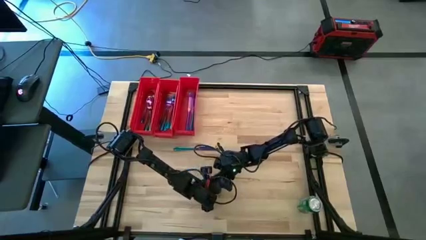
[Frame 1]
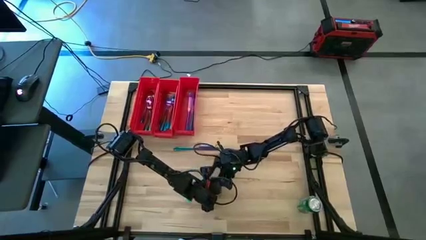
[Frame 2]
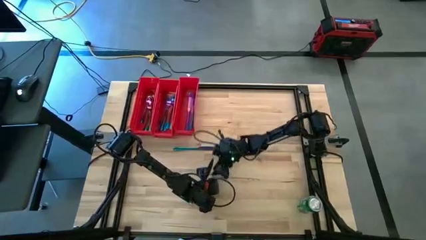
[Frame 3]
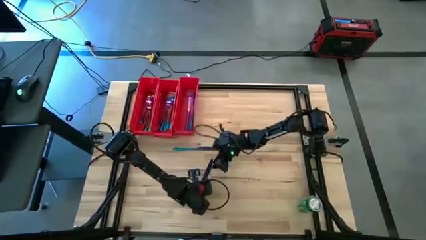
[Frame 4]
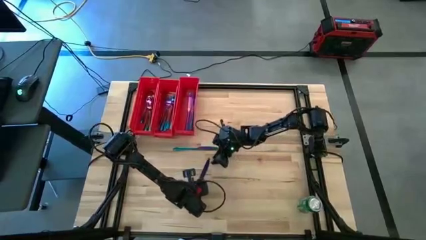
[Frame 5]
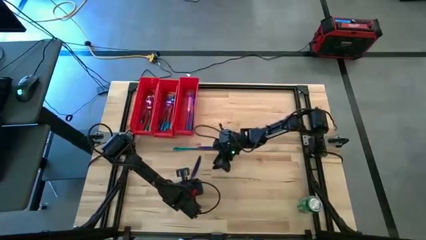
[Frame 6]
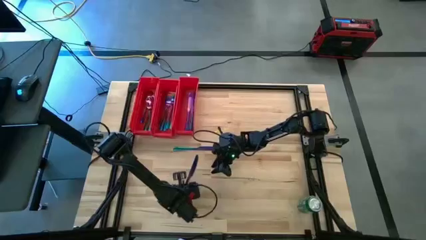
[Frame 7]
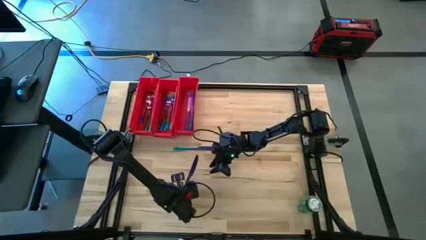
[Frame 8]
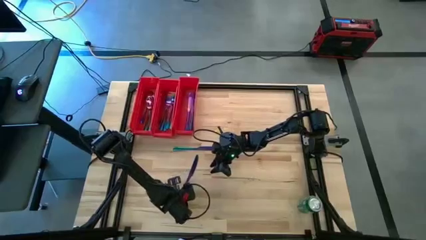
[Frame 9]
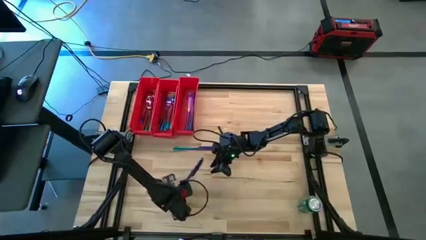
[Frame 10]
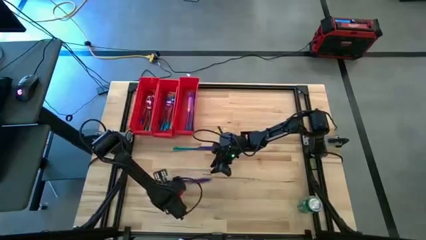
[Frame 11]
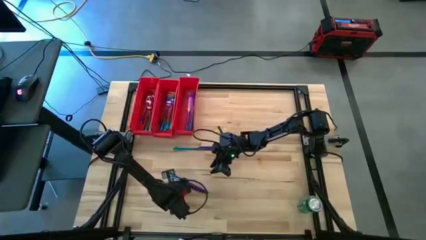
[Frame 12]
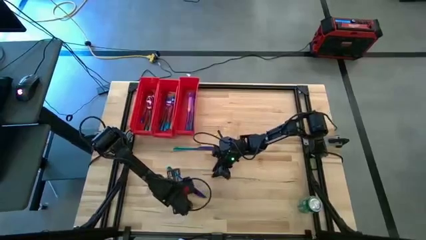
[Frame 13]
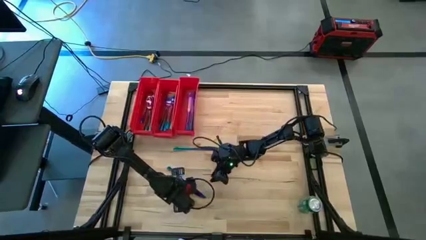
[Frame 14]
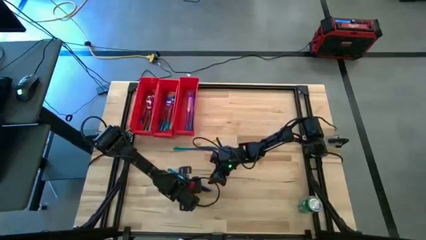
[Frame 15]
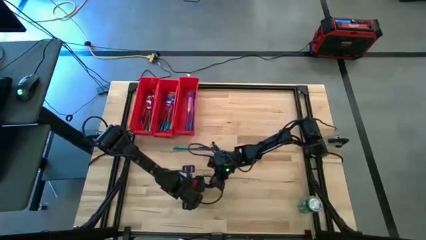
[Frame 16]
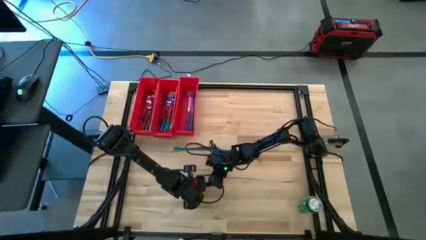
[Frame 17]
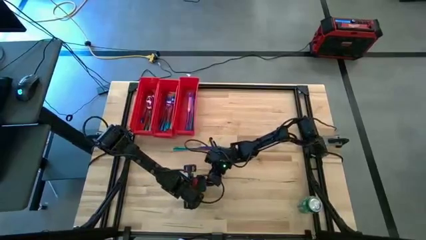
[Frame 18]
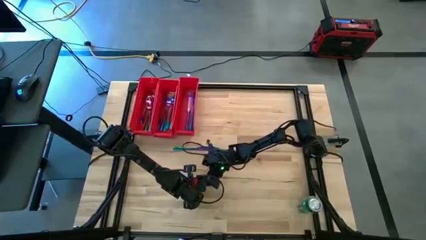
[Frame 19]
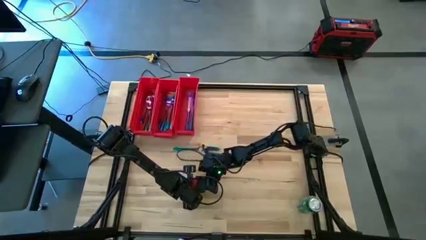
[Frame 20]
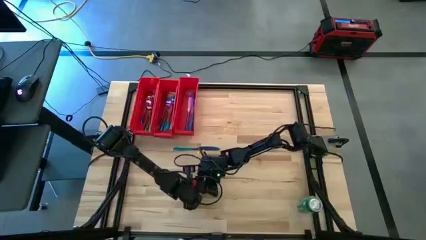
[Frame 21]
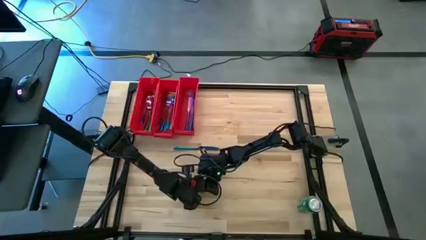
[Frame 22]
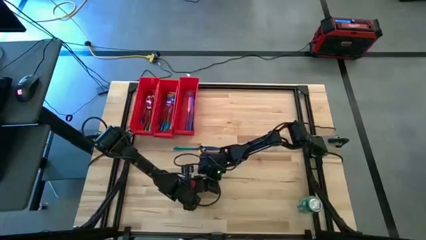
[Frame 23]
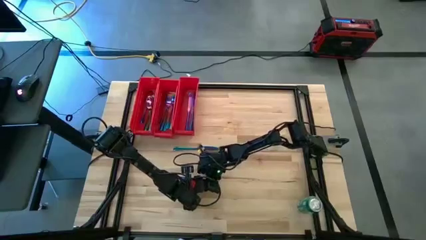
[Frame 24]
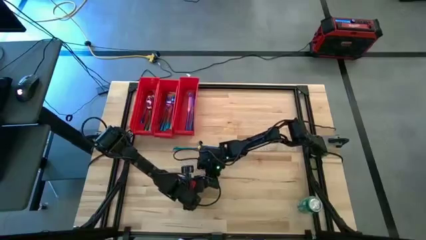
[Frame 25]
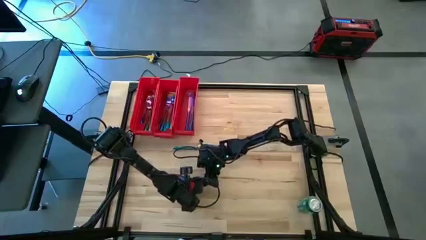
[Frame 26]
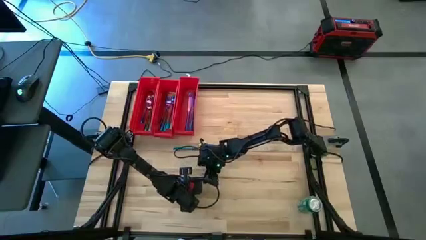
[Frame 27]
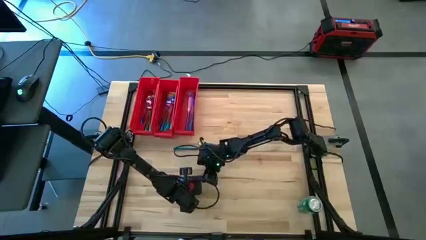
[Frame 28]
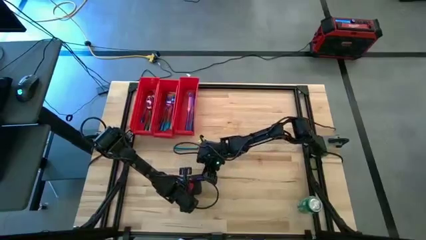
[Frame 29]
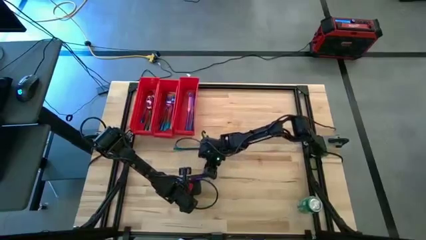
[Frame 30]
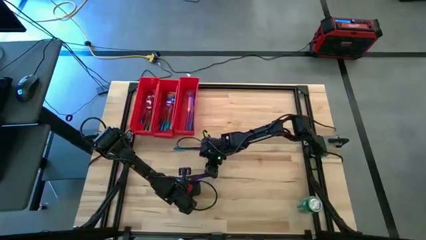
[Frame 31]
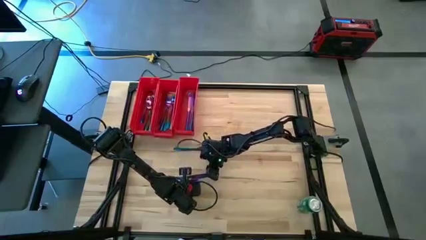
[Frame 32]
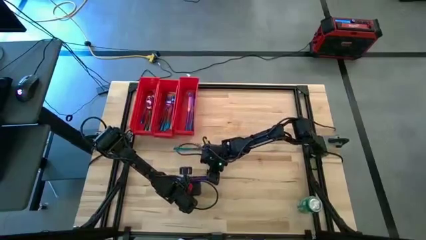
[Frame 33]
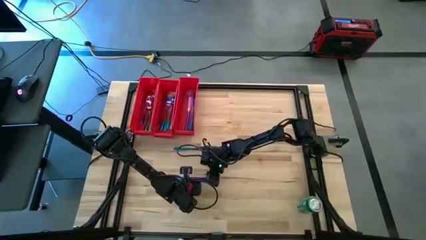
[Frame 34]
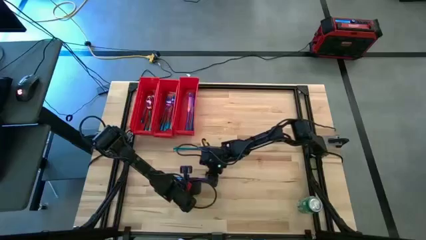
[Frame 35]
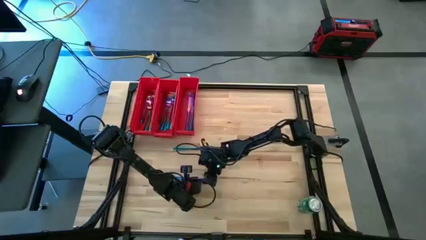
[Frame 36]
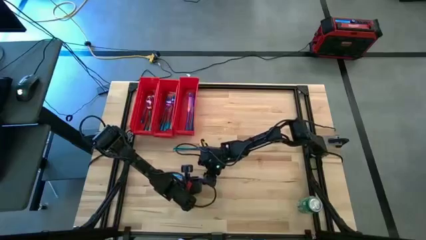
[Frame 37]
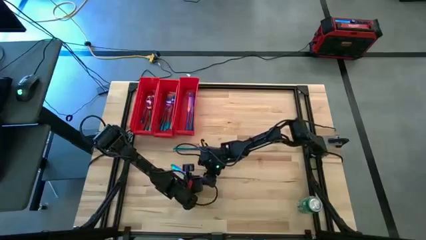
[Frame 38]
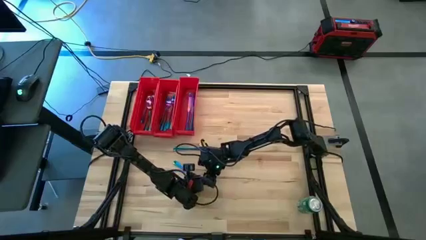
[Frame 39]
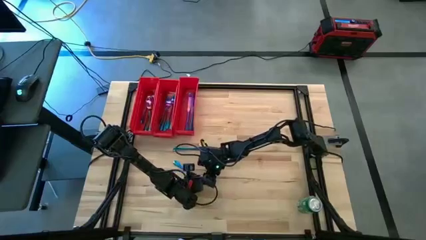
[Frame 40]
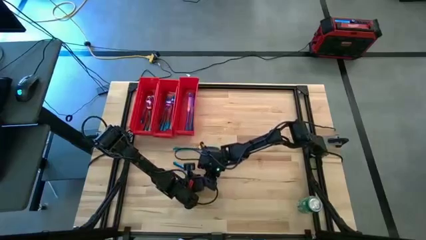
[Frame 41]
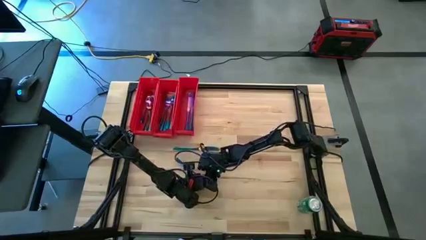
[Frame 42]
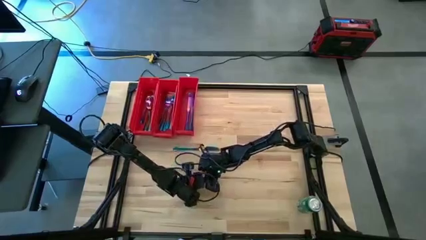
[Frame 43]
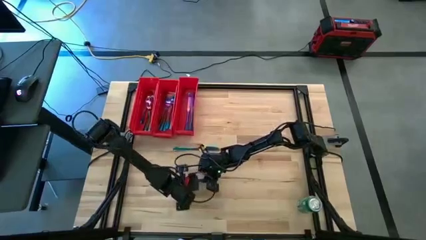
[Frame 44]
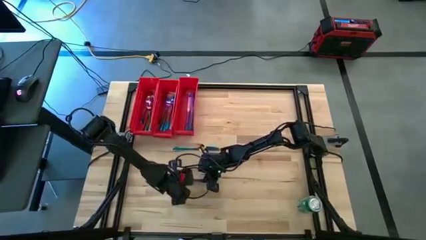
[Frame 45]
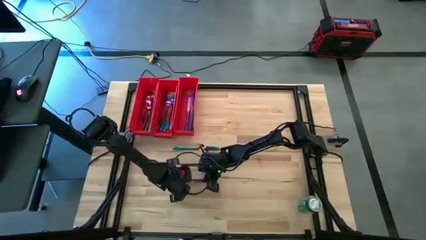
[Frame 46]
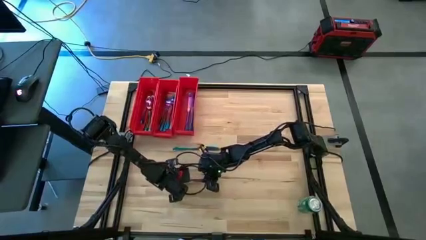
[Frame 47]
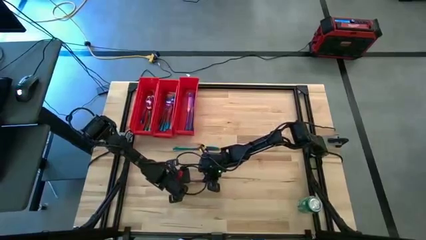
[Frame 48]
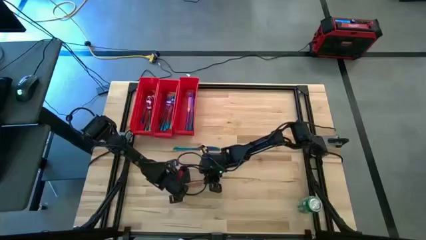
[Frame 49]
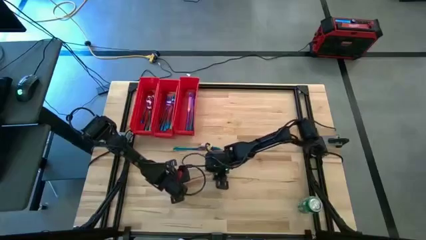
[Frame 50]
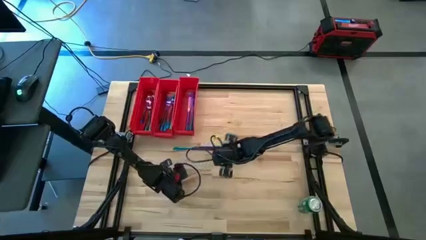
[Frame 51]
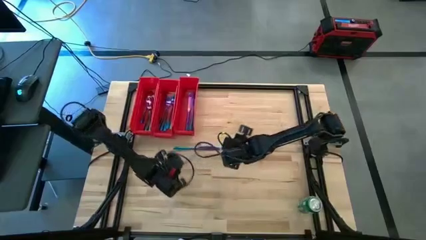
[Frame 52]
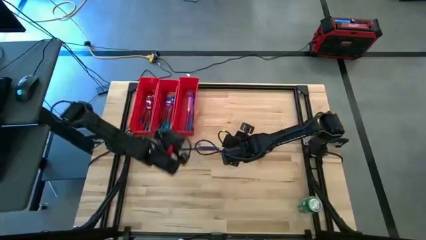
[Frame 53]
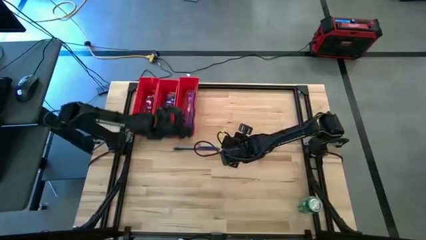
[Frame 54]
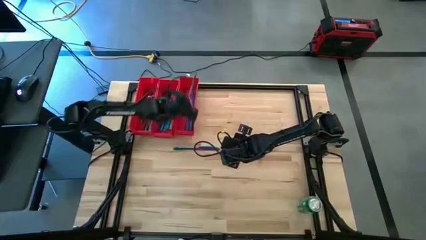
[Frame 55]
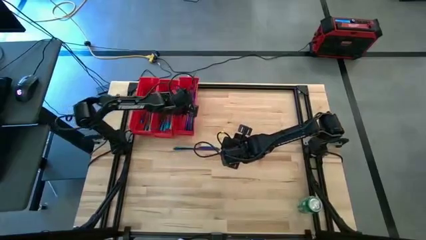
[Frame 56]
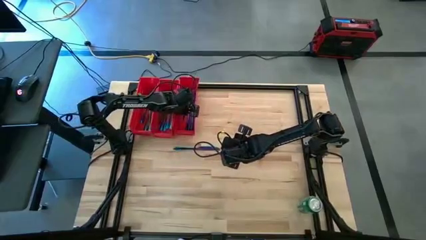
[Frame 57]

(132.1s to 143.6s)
Task: Sort silverware
Put the blue knife into the right red bin

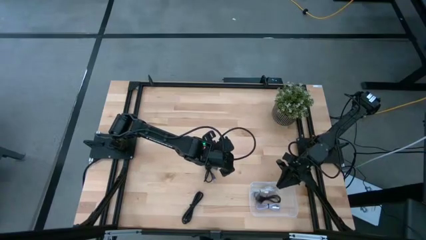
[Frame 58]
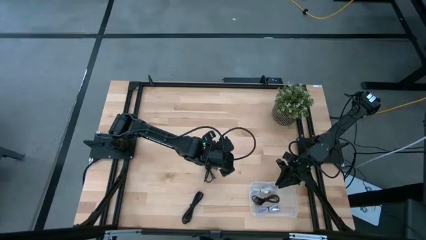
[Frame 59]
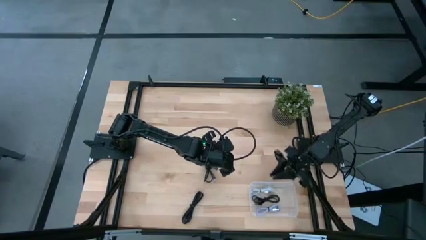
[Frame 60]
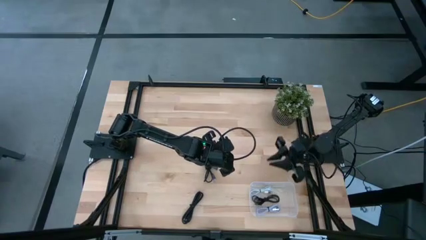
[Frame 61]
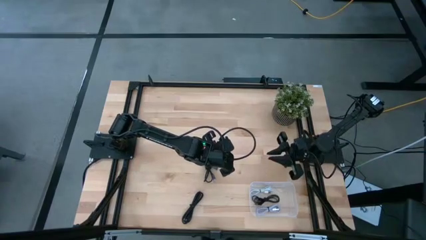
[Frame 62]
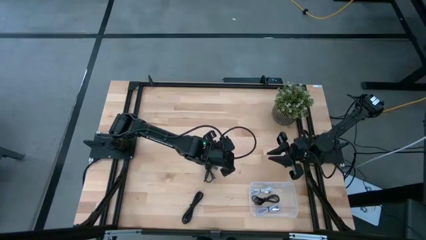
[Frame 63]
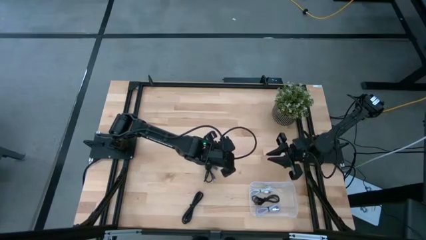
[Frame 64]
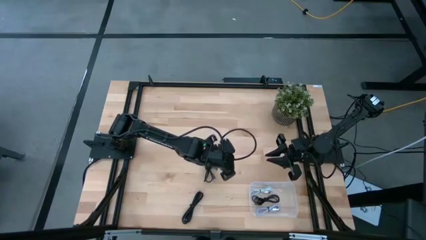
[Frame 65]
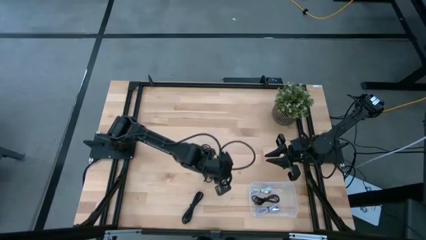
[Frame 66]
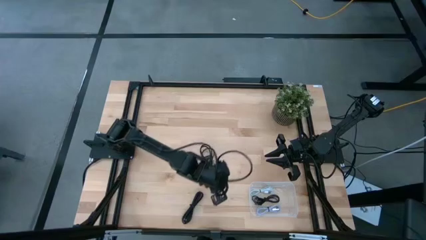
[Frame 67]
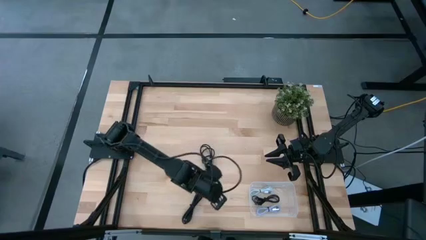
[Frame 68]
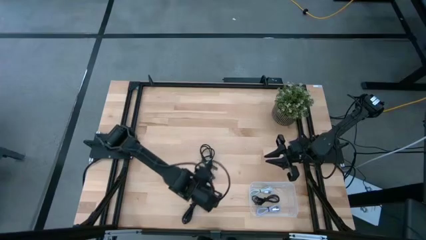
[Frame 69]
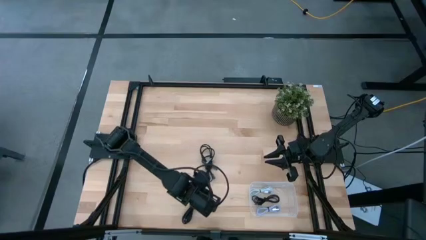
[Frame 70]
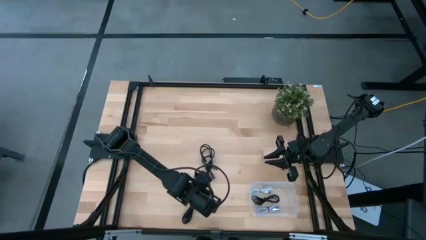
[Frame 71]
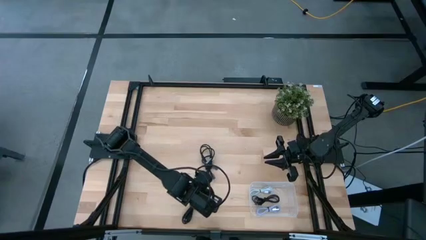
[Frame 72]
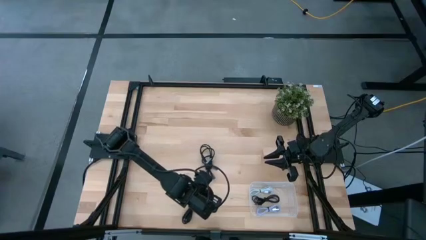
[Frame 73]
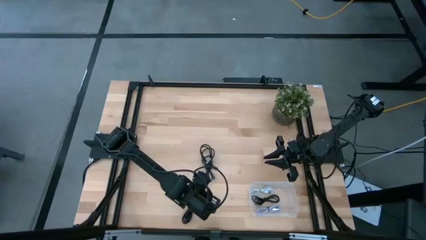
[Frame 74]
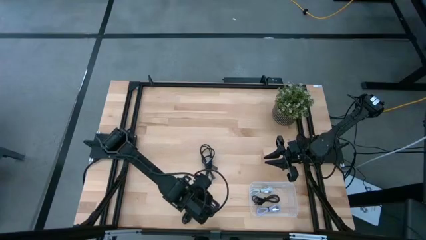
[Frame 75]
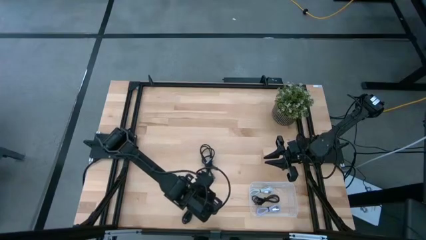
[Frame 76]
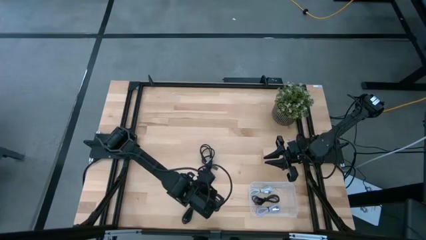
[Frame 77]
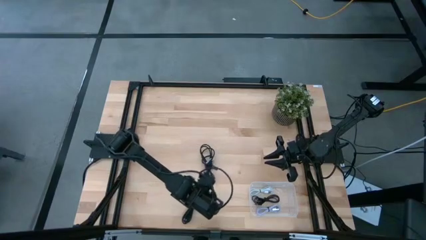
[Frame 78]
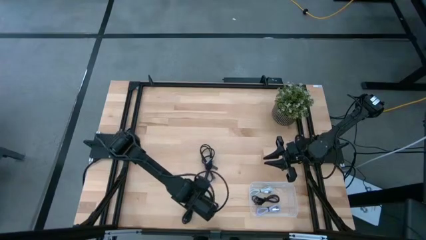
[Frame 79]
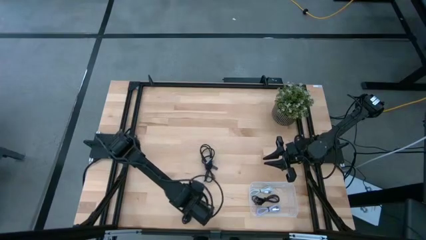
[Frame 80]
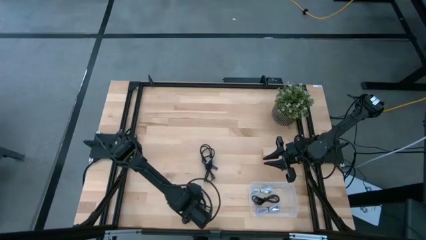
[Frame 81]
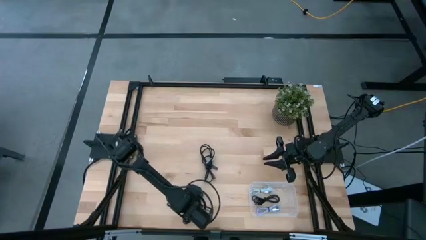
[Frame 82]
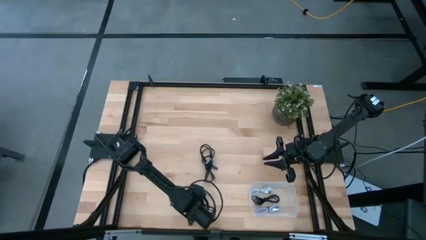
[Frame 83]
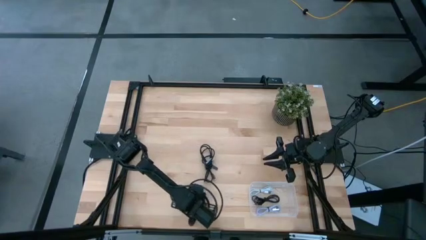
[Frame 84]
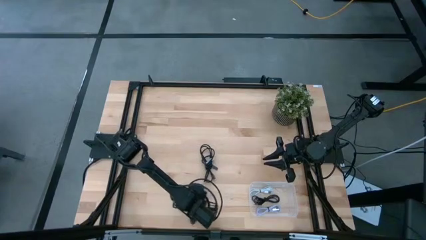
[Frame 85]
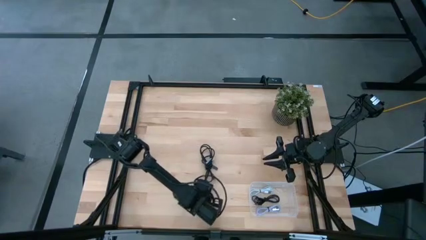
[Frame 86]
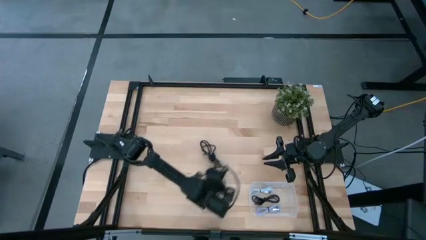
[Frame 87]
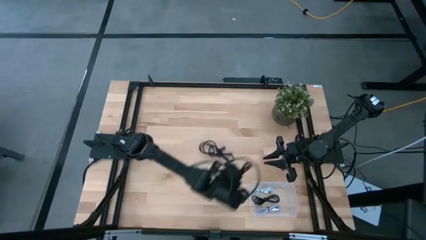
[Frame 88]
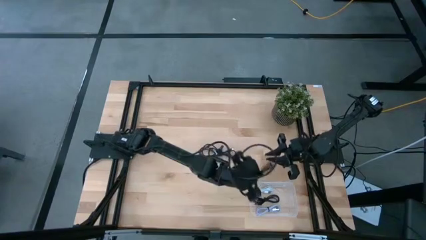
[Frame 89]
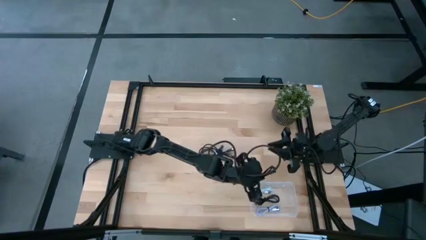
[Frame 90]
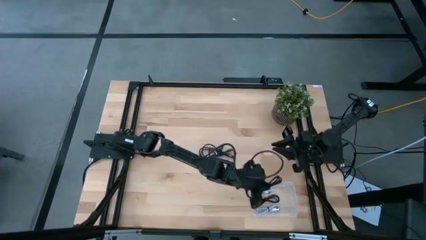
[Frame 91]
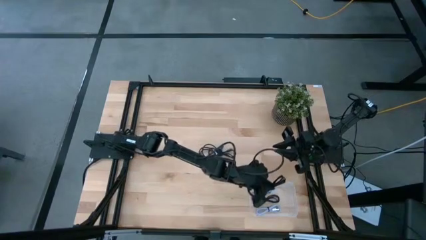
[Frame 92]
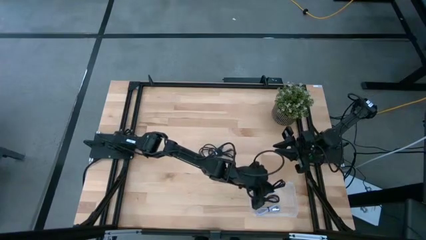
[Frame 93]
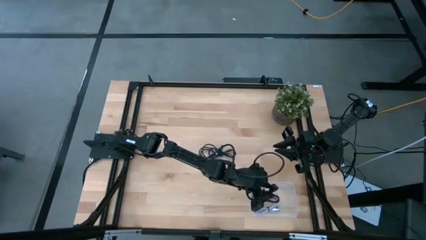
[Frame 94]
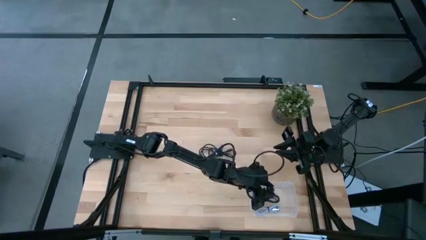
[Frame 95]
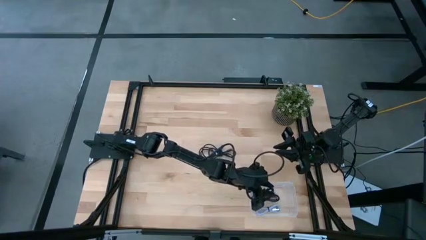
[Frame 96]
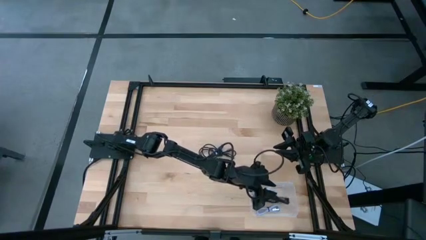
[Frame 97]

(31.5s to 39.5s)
Task: Pick and place USB-C Cables
Put the bottom black charger cable into the transparent bin
